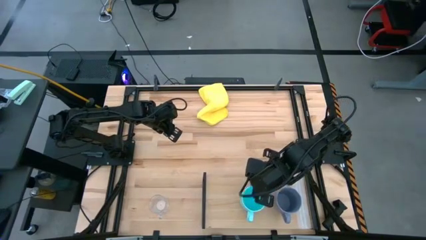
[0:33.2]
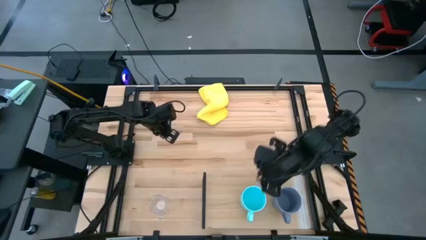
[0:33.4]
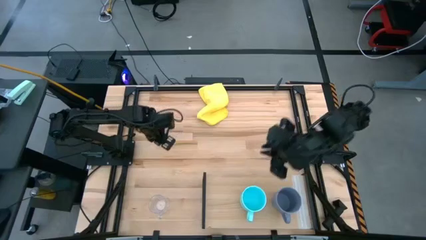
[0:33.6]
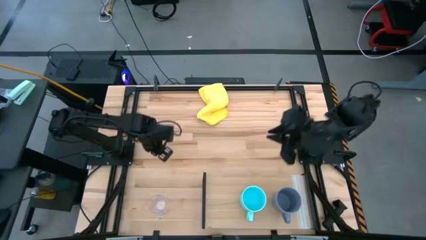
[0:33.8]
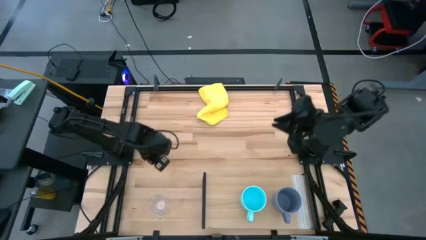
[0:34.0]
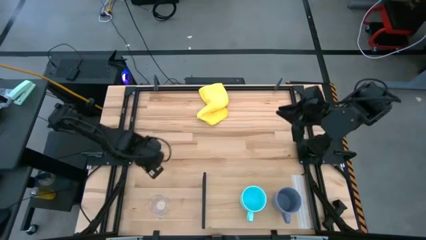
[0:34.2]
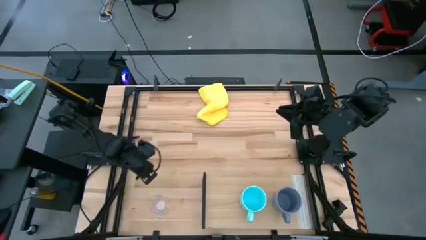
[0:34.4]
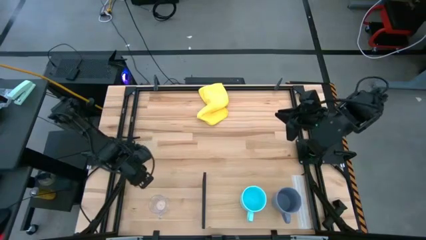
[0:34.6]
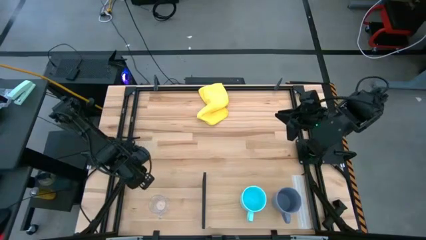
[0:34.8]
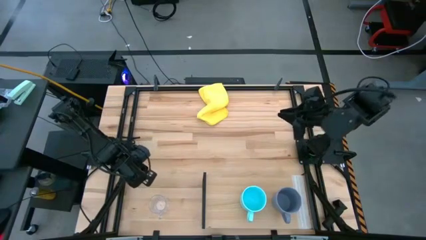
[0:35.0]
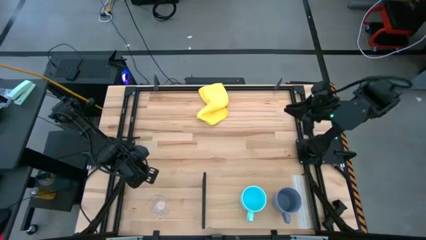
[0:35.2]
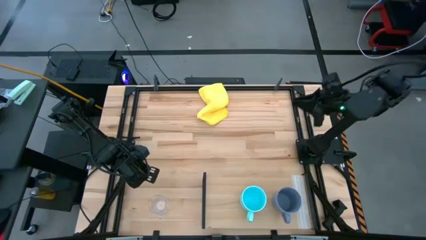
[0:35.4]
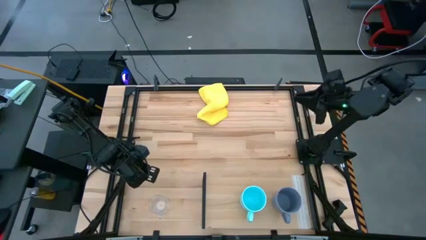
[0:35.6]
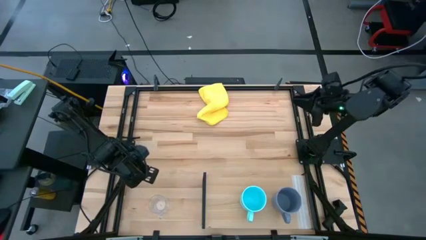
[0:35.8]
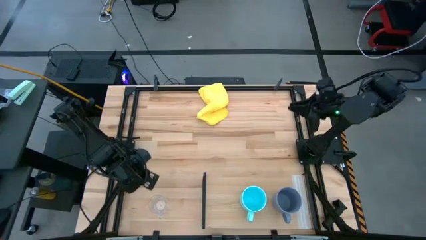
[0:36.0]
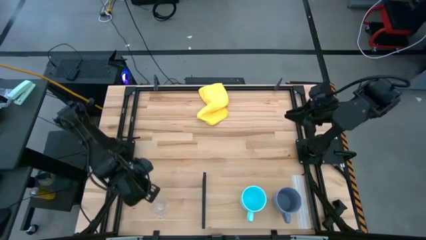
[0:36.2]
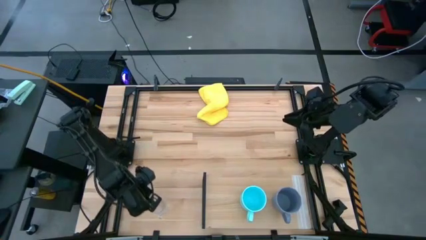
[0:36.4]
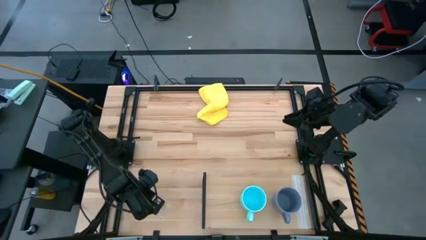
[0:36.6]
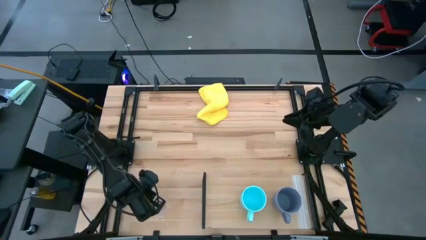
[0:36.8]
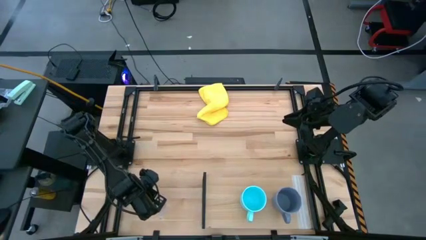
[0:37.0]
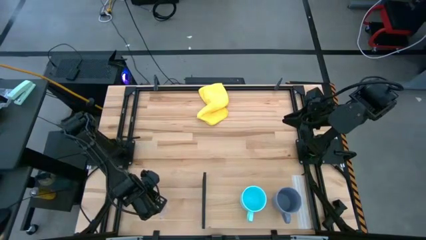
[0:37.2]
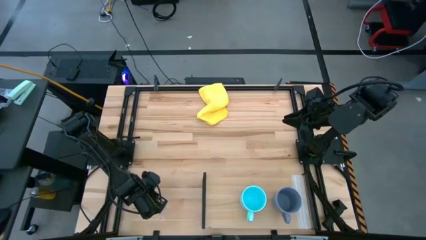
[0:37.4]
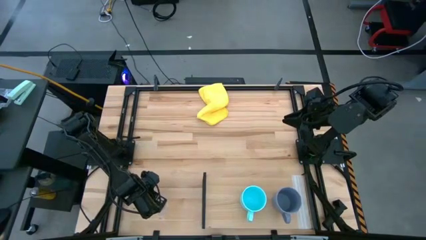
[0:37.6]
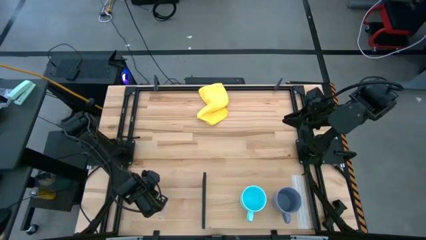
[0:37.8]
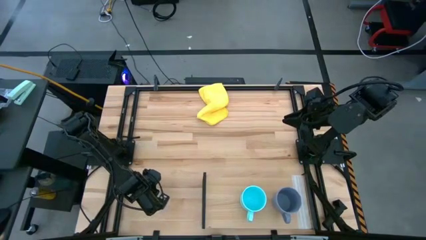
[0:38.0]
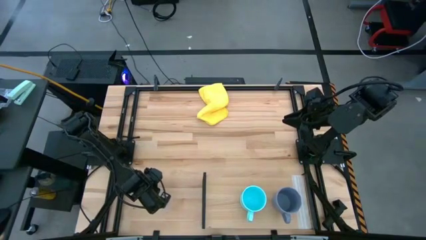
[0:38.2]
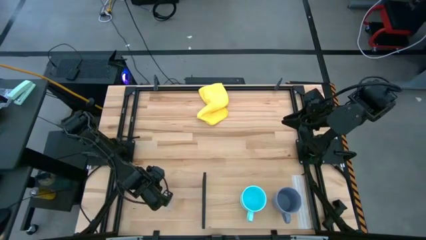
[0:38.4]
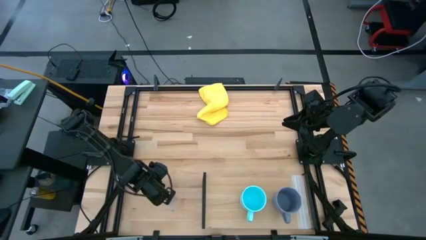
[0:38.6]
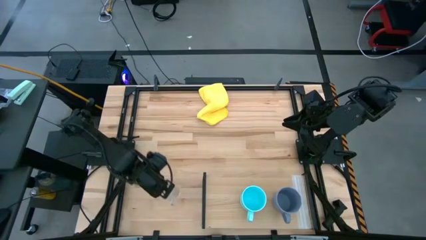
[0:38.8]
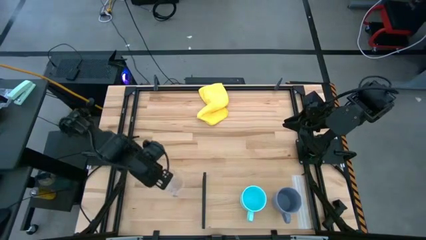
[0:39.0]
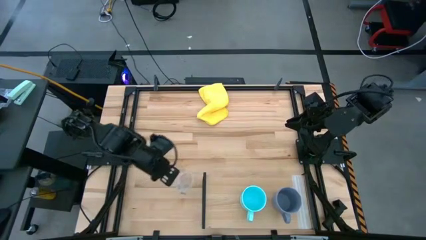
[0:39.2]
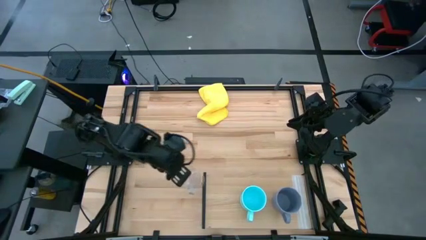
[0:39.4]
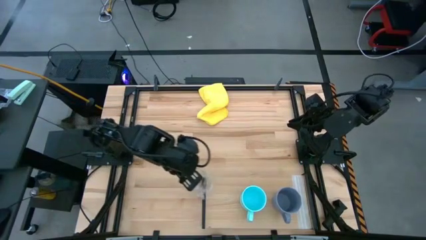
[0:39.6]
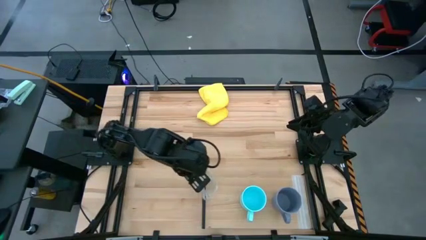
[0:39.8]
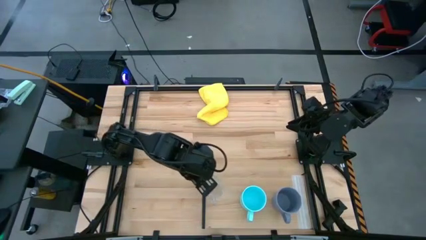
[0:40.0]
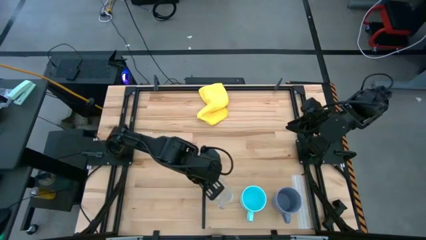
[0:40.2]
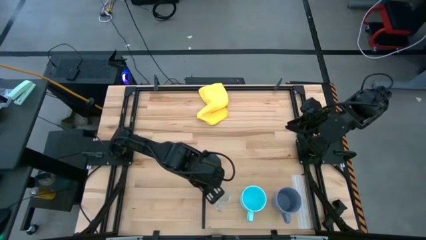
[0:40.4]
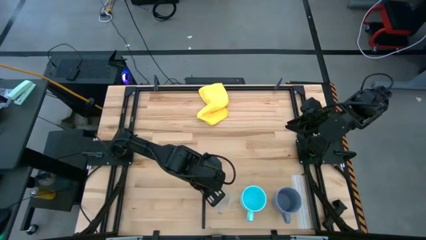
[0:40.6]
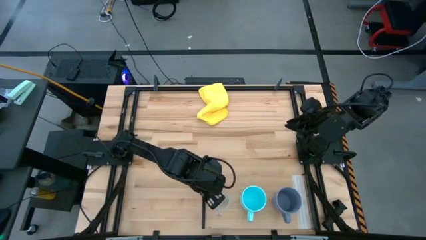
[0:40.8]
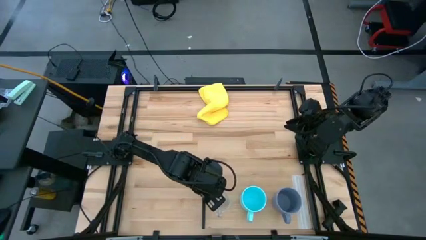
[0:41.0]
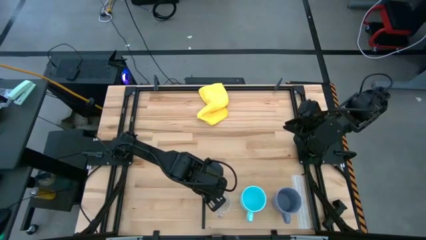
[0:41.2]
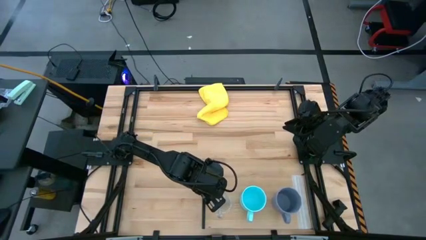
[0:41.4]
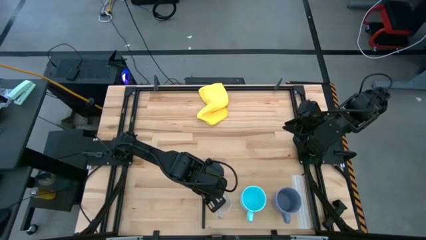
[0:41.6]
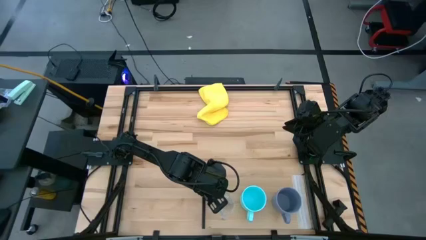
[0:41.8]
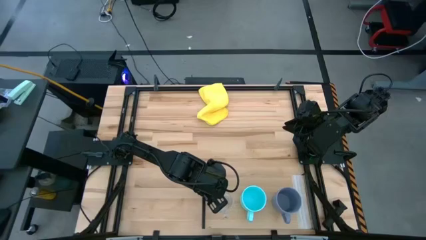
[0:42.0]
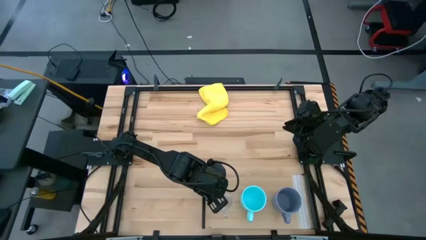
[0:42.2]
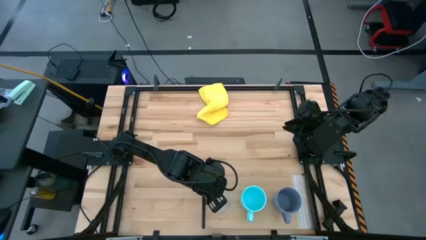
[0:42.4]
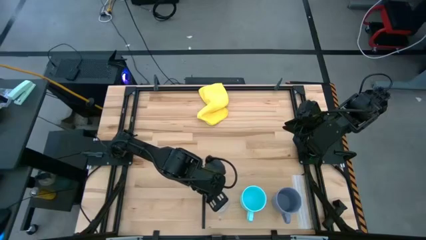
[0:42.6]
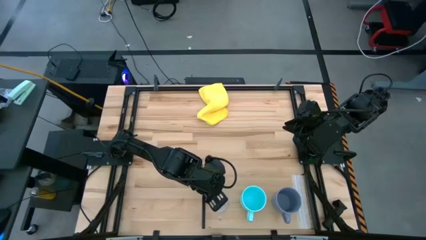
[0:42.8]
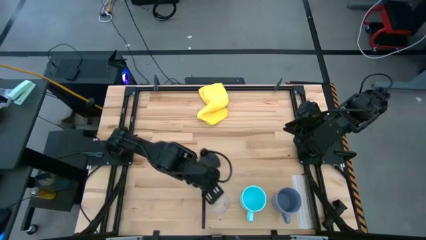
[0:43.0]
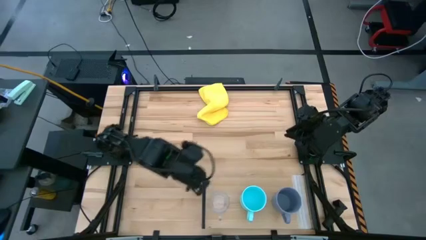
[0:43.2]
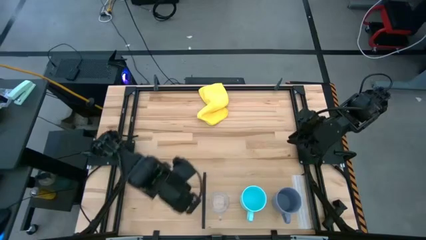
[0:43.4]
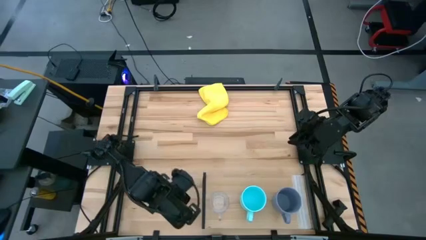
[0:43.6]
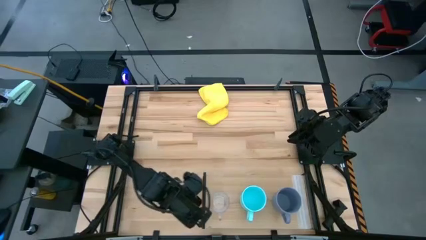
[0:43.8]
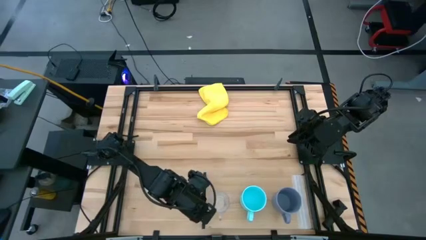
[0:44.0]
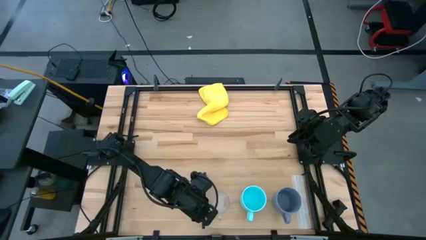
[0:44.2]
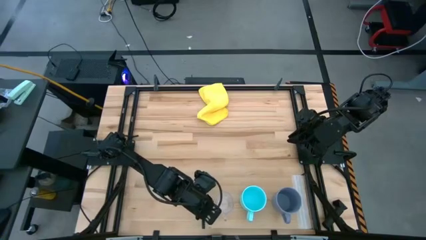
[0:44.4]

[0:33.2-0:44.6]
Task: Stack small to large cups/mugs on shelf
Put the transparent mug on the shelf

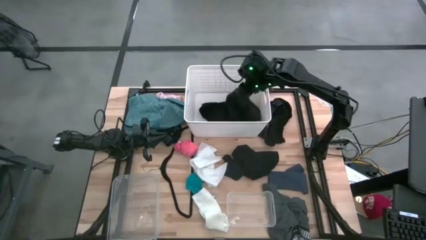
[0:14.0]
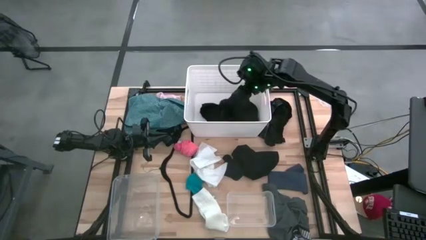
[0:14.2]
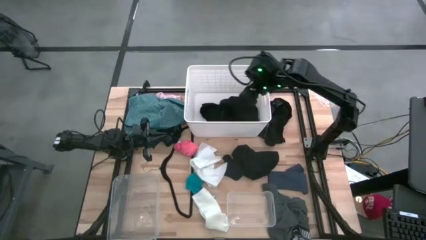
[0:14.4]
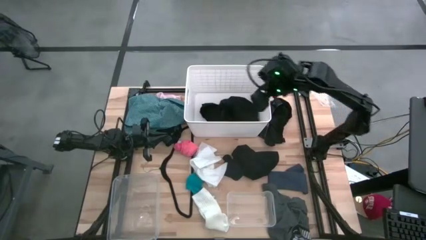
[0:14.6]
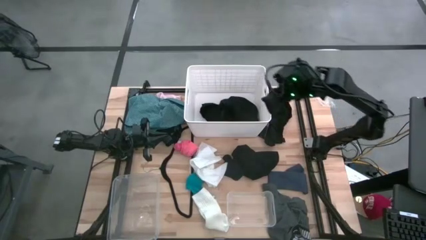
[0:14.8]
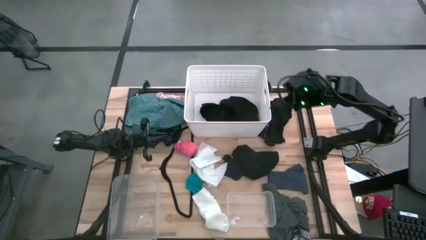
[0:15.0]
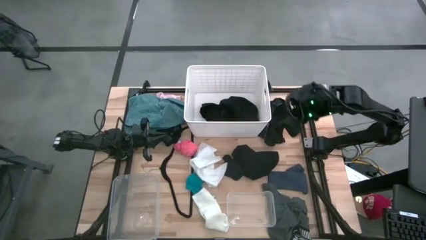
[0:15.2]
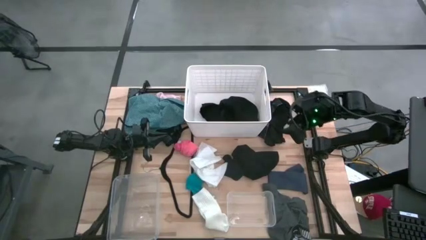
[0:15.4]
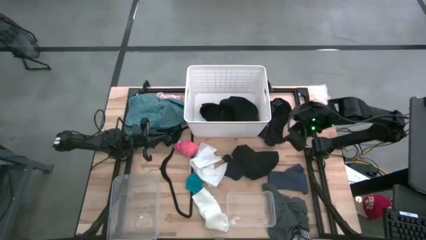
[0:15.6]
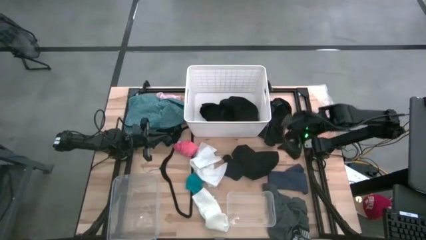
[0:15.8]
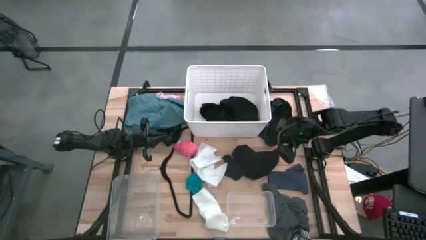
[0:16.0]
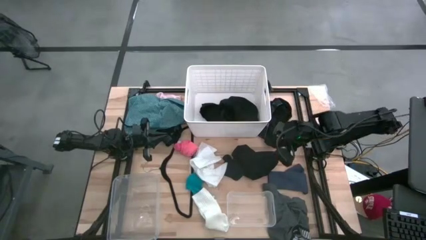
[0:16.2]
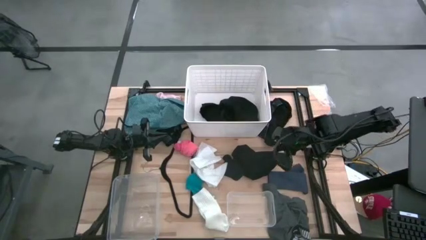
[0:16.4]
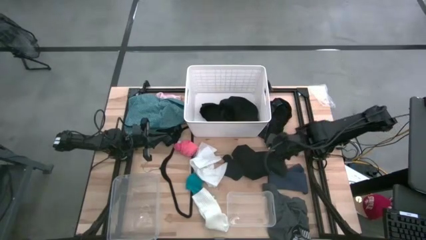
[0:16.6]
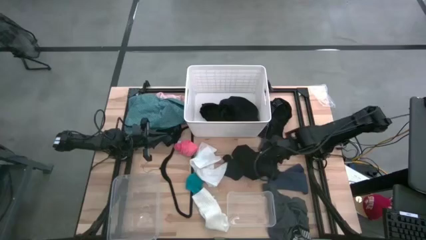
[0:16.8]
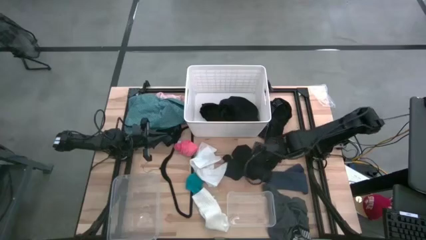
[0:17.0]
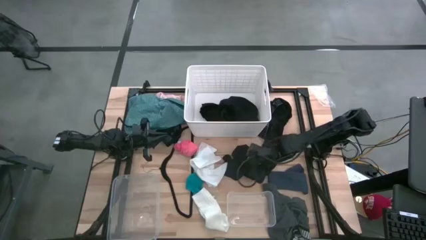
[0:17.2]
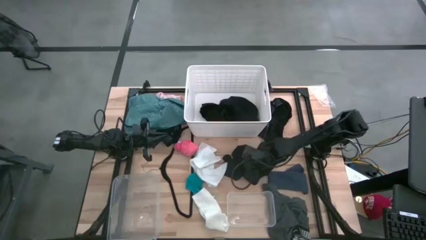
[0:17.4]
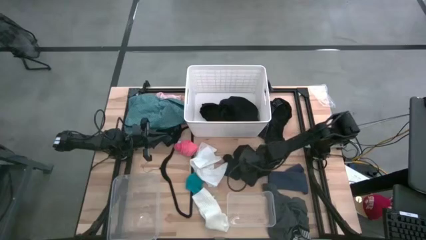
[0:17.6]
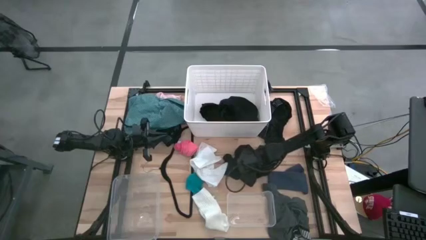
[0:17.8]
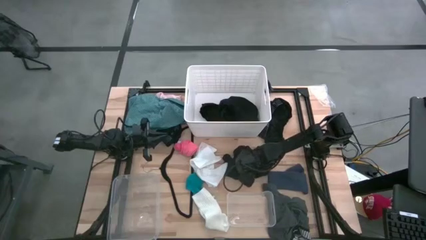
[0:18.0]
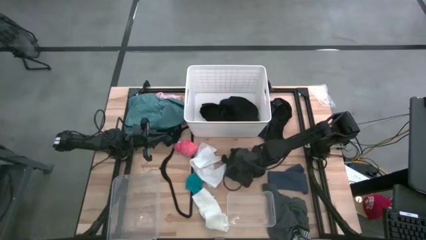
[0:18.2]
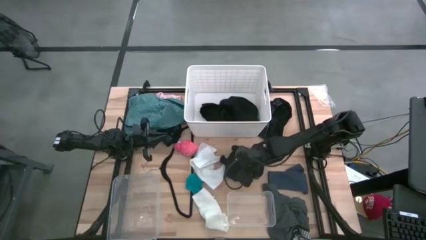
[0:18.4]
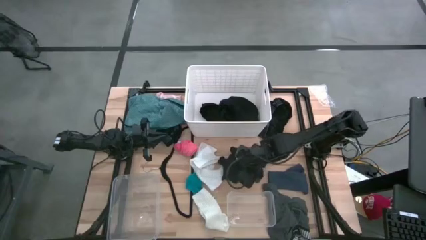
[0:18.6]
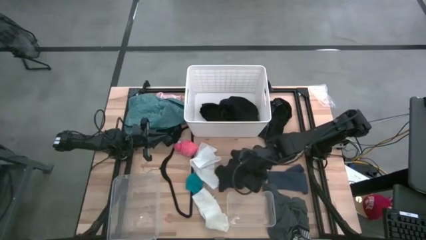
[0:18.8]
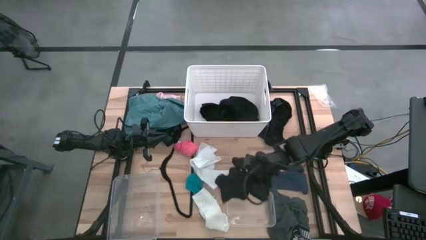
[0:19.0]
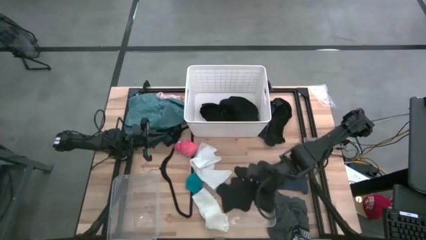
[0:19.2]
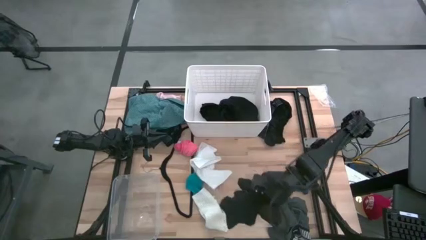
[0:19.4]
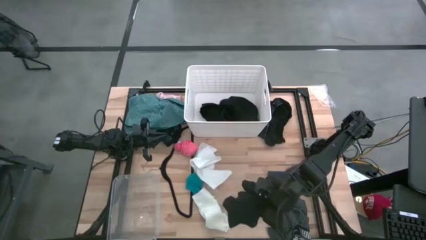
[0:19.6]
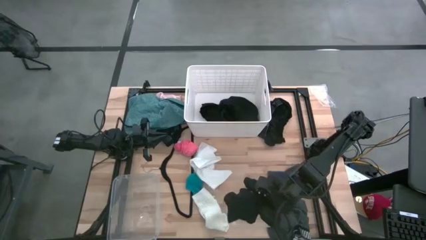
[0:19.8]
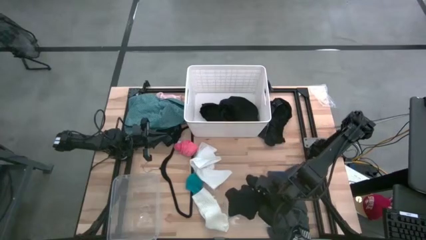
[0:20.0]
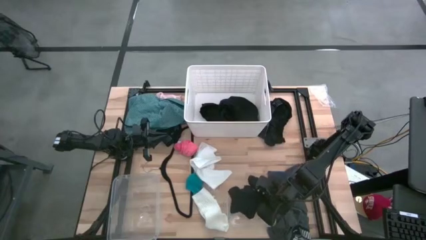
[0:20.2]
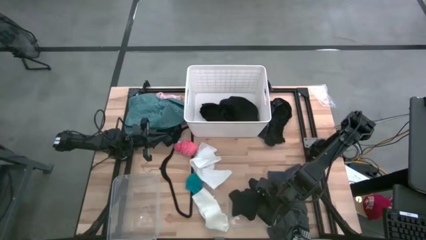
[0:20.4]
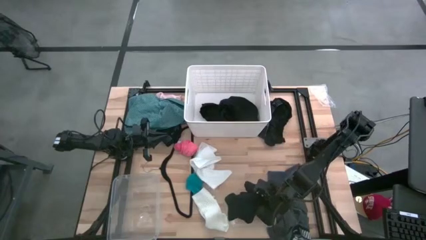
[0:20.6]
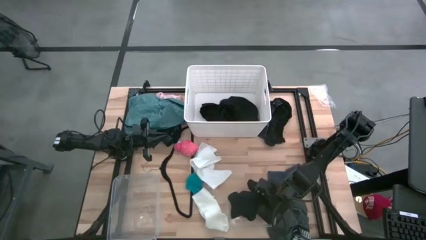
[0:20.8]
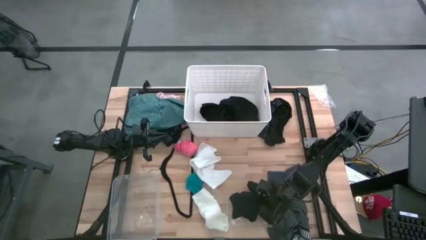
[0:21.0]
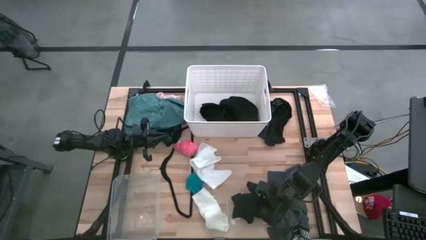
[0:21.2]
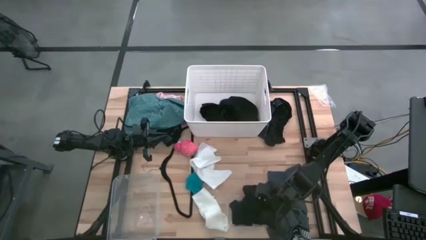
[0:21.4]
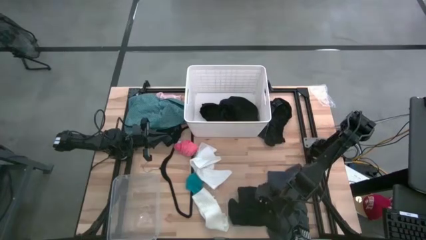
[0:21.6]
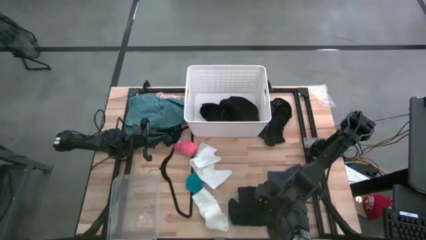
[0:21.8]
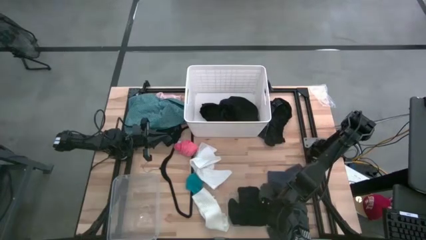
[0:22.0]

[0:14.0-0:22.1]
Task: Pick & Place Cloths
Put the black boxer into the right transparent bin
